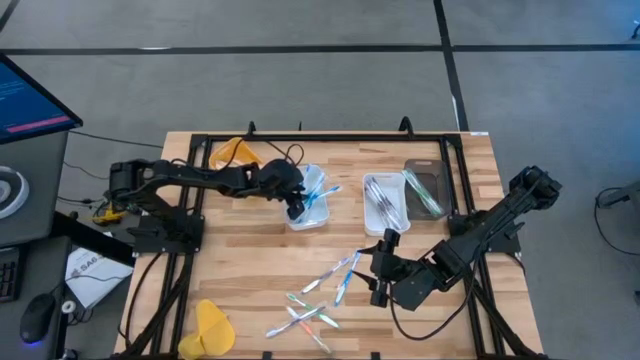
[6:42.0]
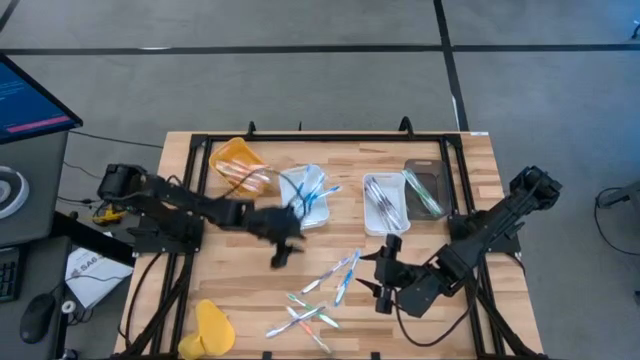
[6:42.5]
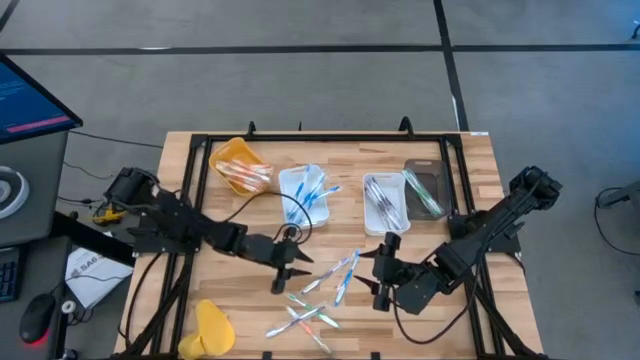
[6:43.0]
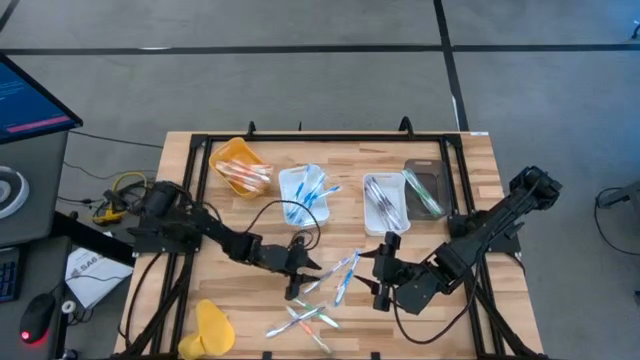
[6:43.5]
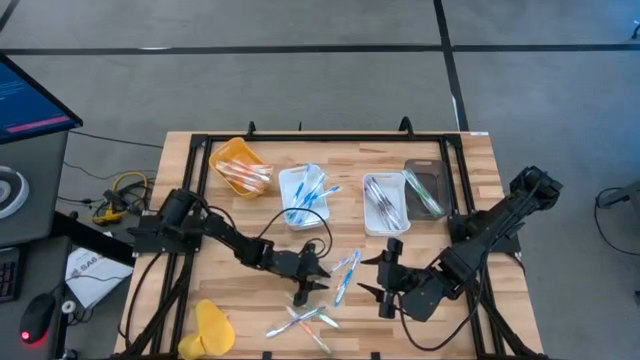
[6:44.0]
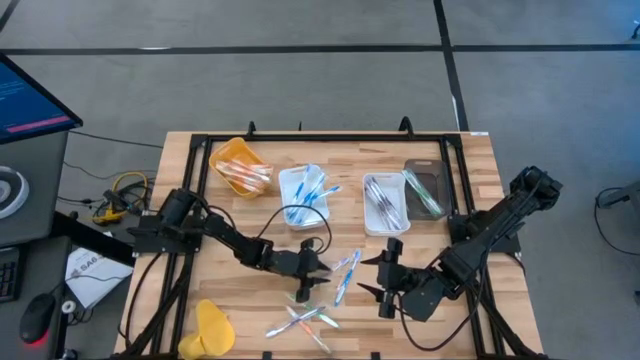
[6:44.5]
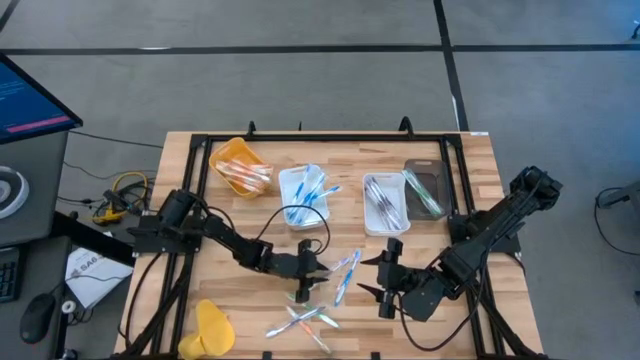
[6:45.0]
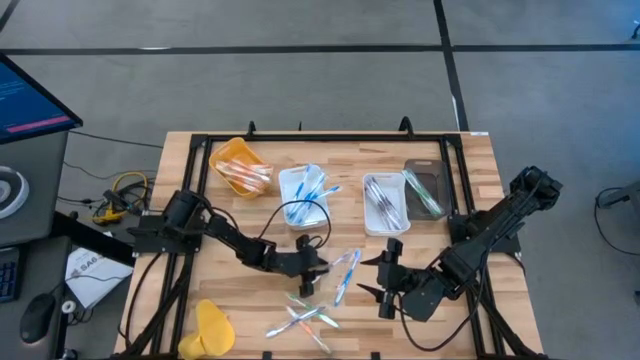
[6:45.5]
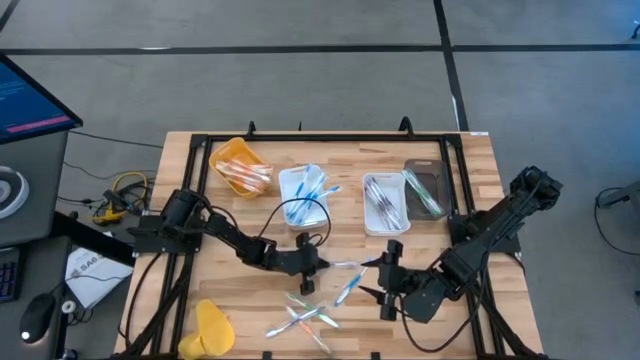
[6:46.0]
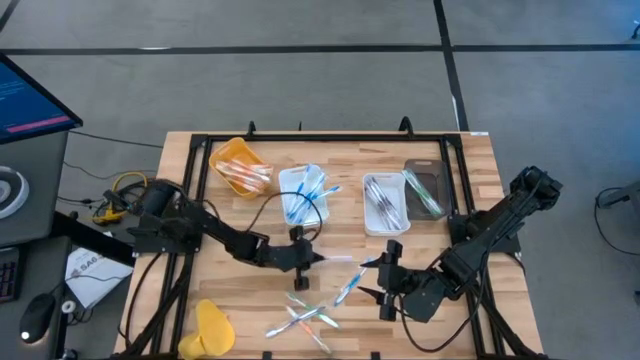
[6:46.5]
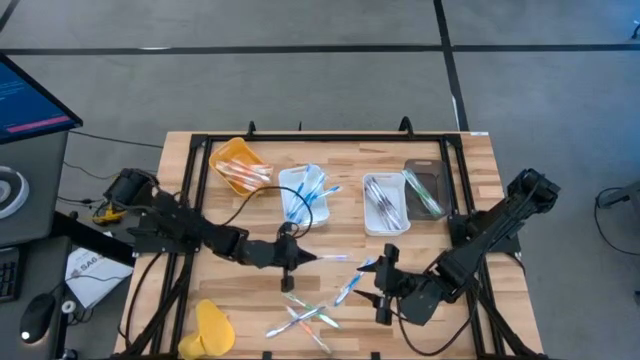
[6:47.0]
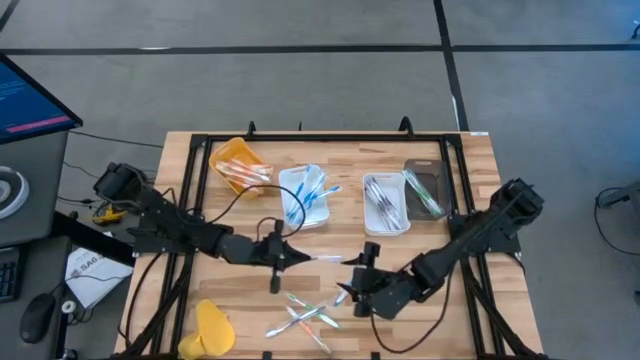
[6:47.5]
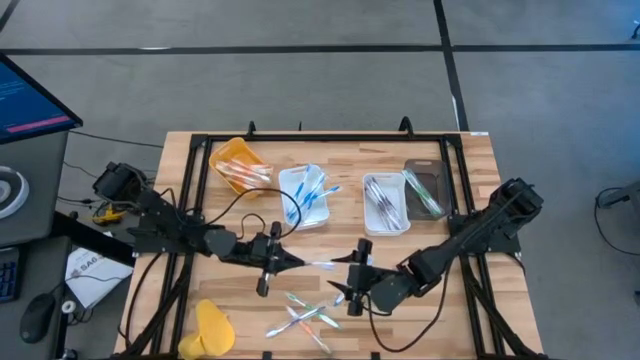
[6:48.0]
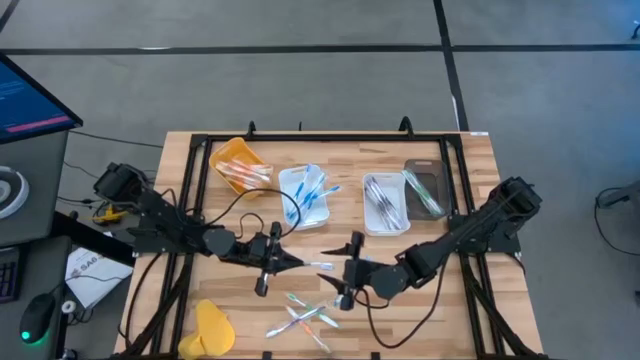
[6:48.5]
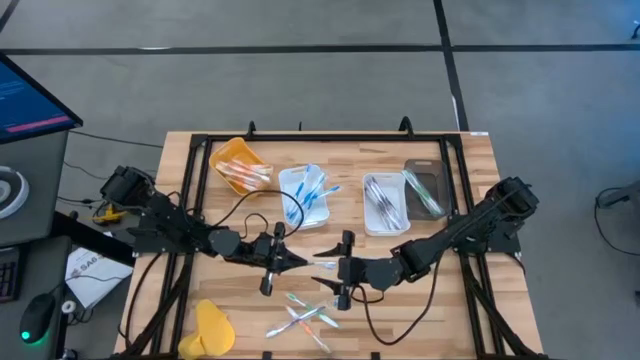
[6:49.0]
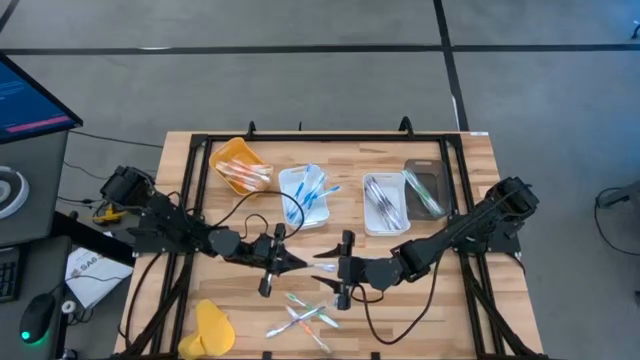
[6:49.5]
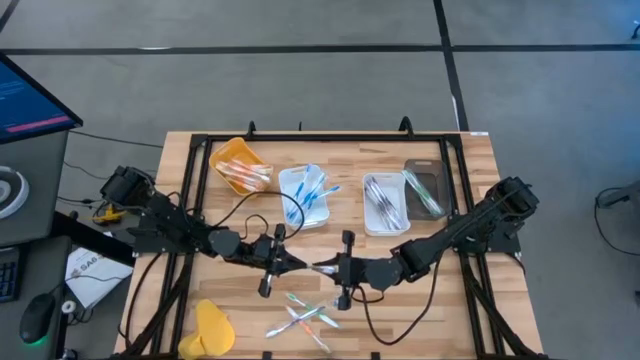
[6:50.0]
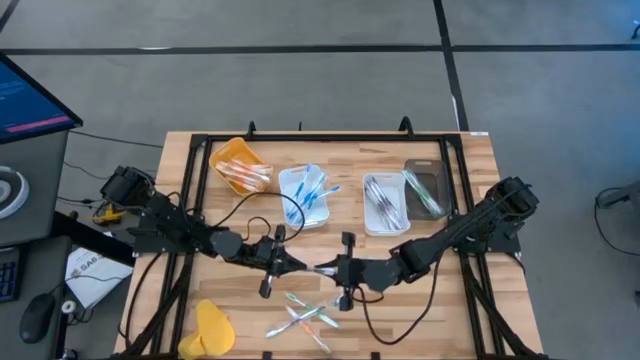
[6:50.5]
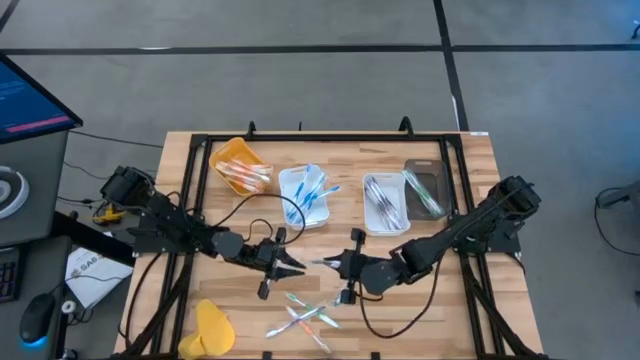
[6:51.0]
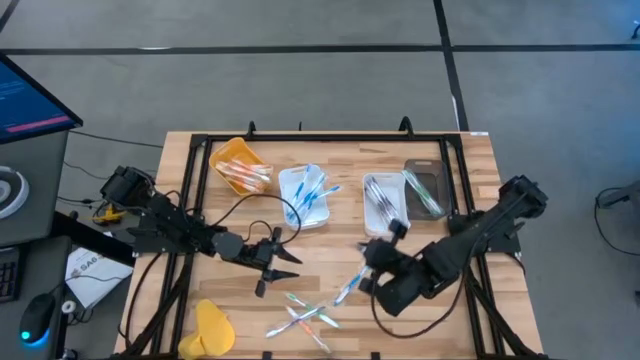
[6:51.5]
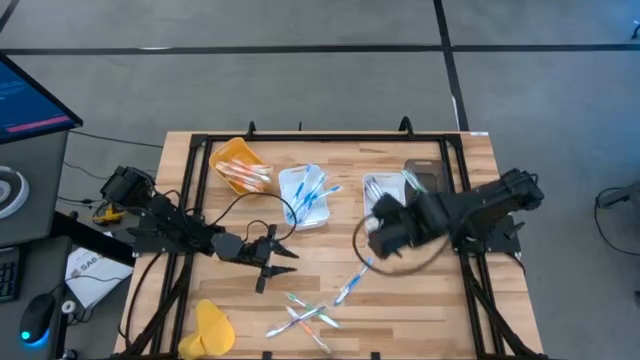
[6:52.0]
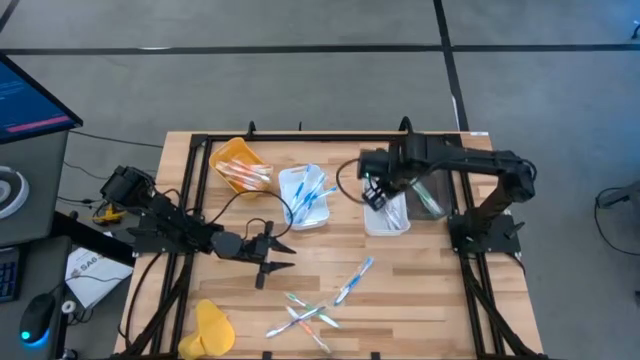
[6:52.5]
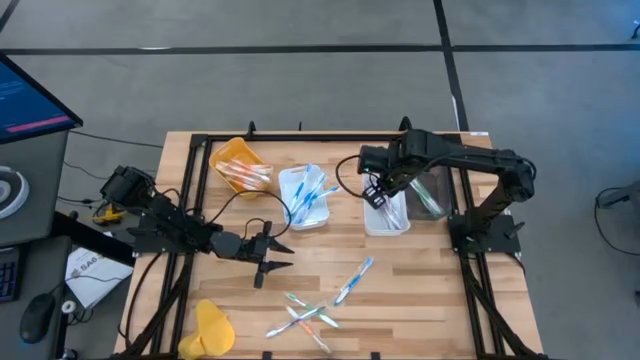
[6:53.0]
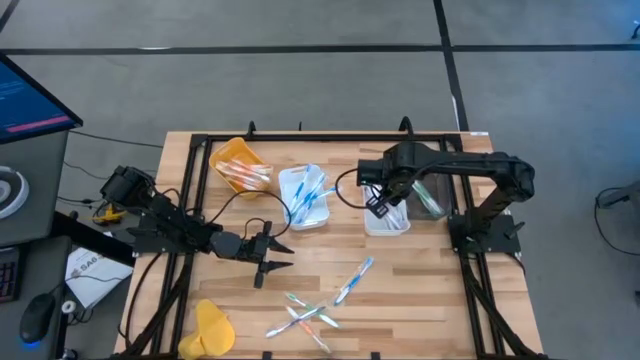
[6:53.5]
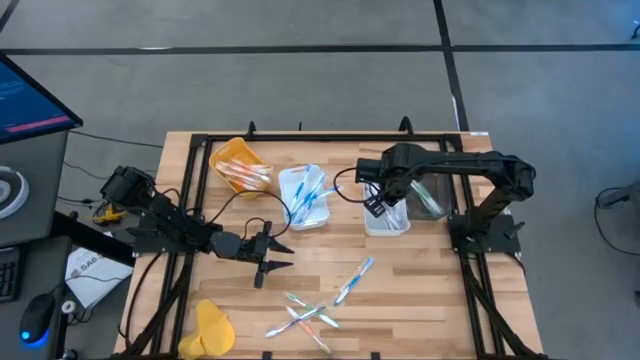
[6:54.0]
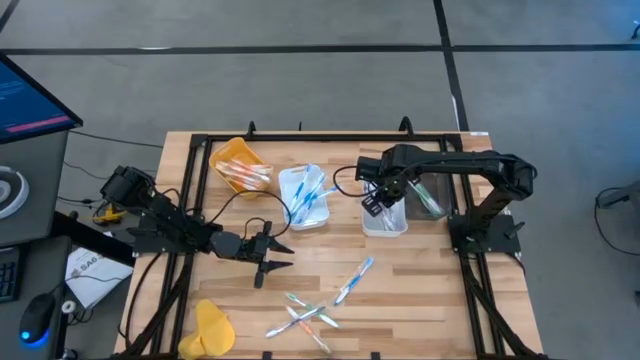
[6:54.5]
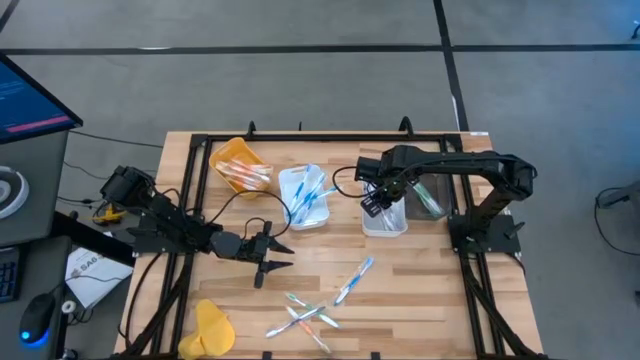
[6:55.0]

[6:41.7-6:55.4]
Task: Pick & Place Toothbrushes
Put the top purple toothbrush into the right white bin

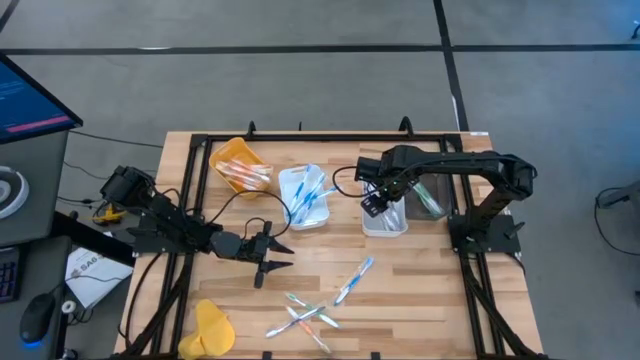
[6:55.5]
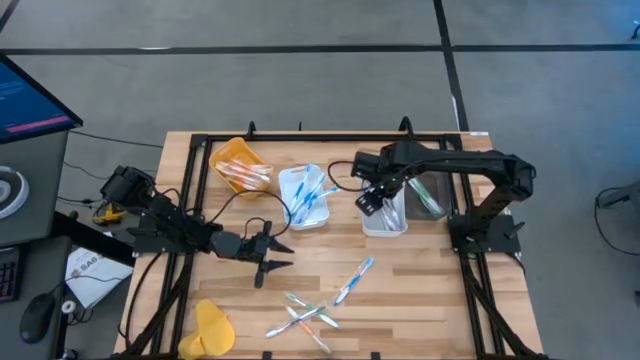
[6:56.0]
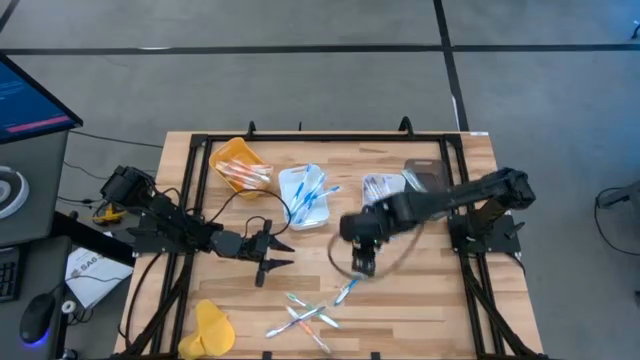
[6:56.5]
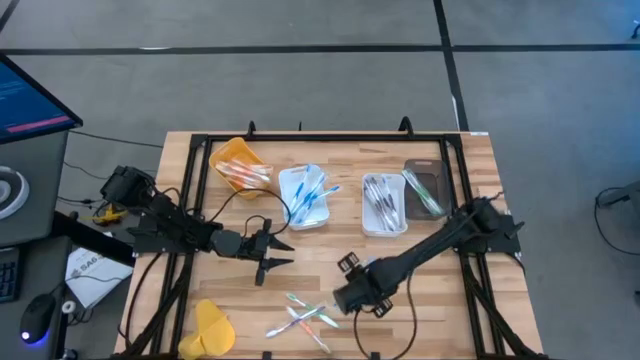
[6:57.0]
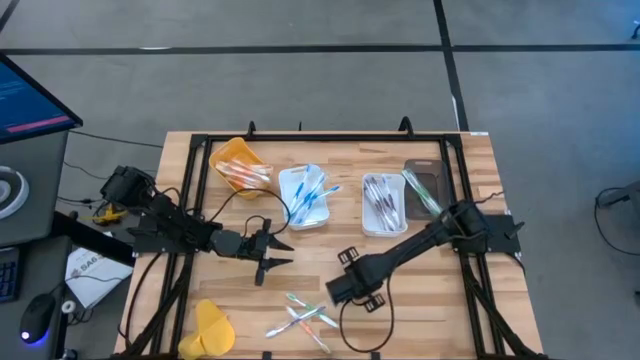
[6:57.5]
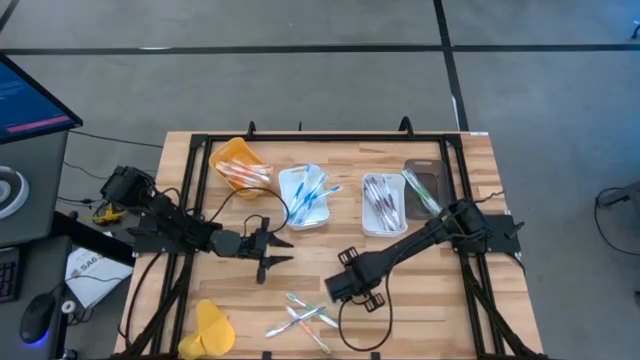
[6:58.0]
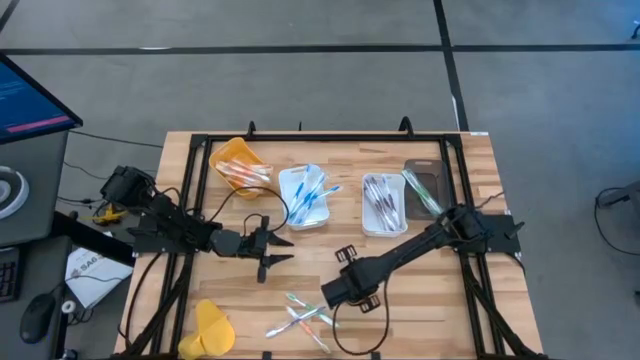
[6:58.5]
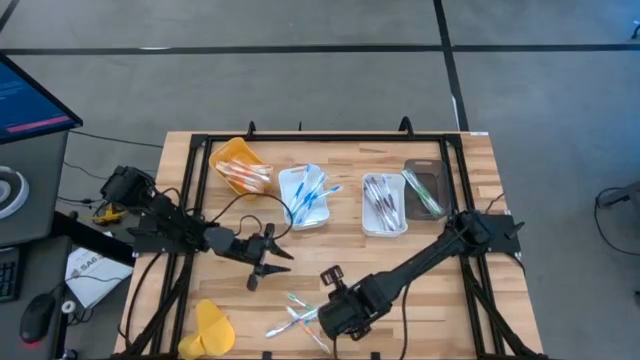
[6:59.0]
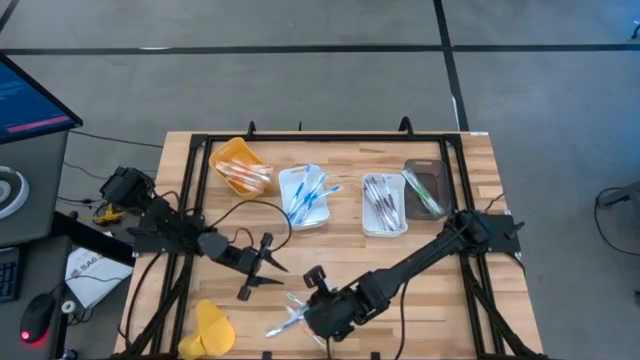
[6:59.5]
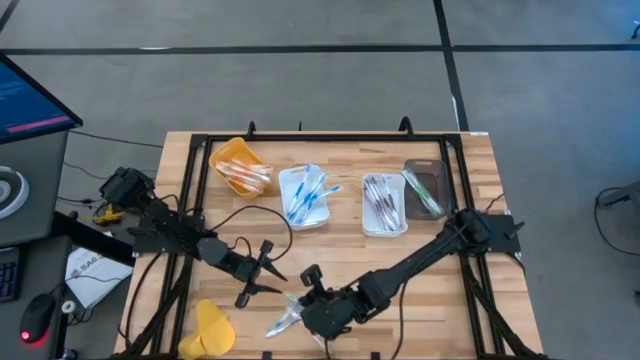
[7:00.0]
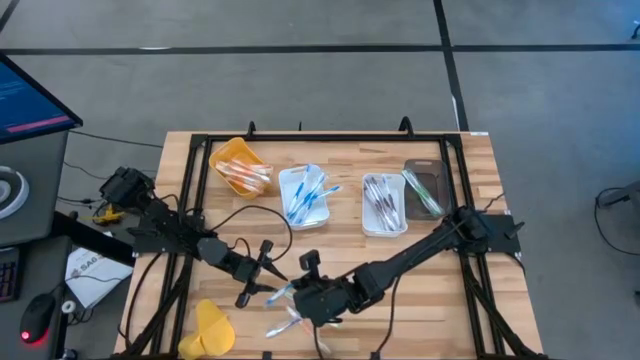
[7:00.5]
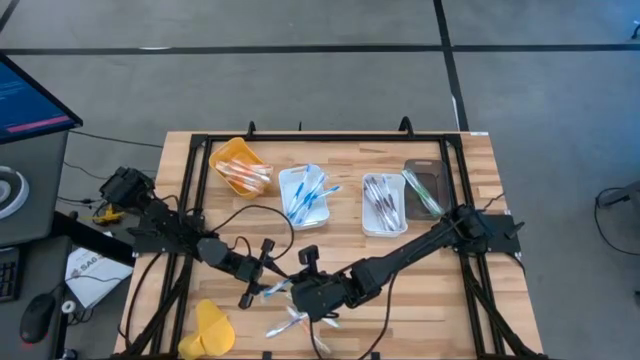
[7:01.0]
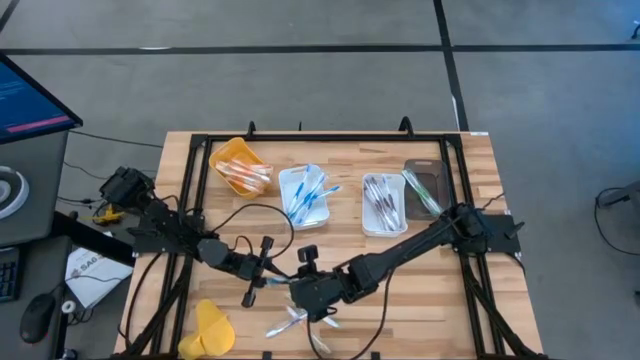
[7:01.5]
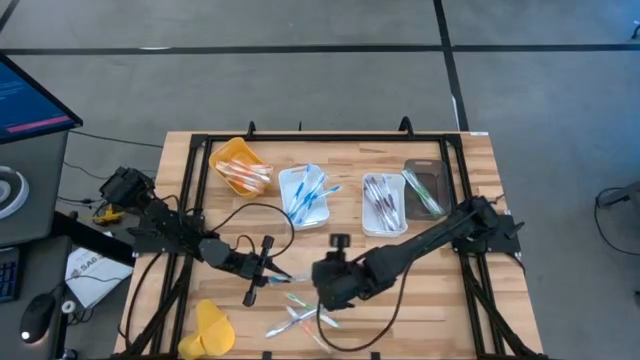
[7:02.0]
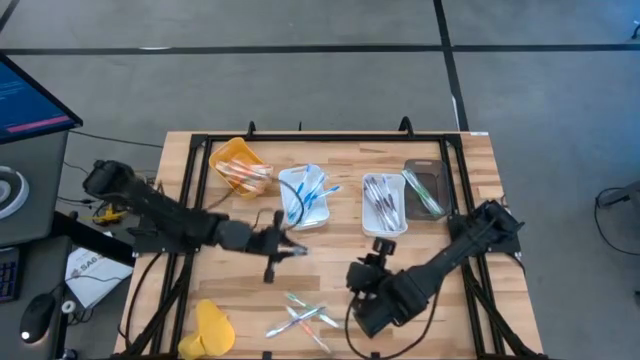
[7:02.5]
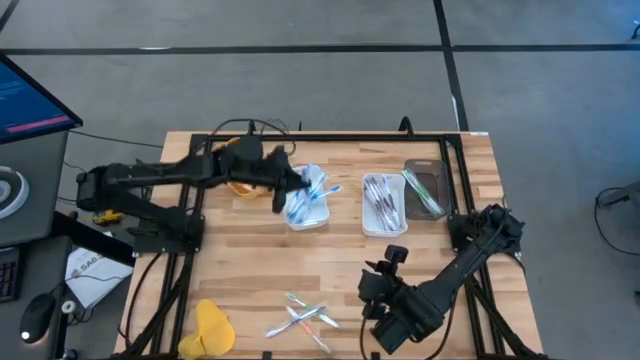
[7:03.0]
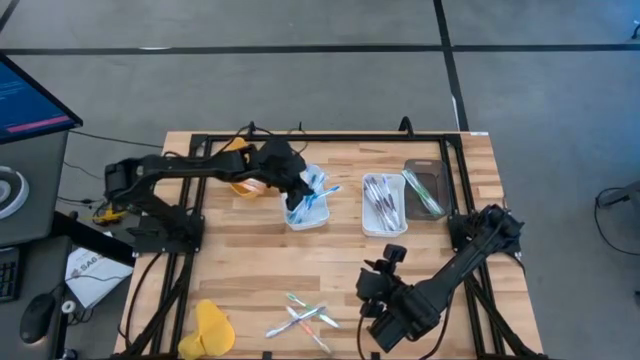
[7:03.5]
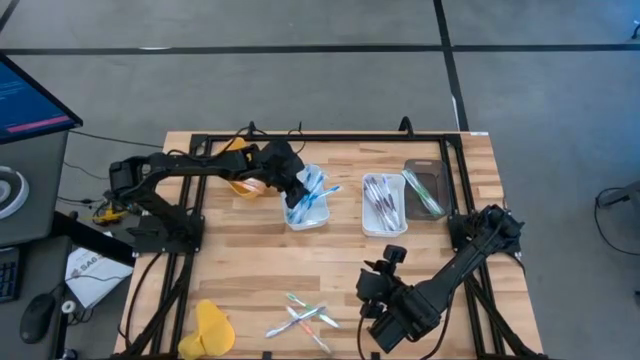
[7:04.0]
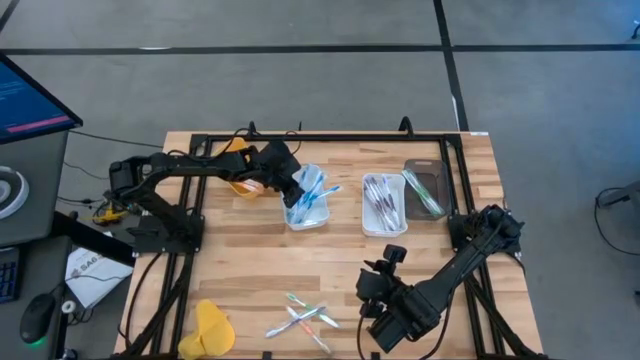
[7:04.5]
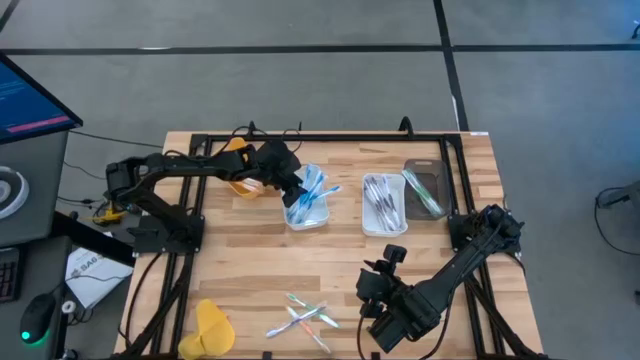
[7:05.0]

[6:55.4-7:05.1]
Put the blue toothbrush into the left white bin
